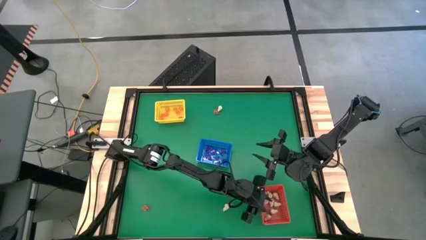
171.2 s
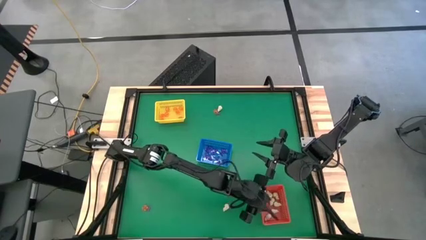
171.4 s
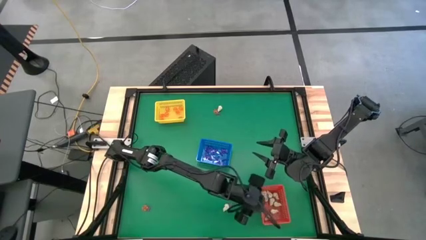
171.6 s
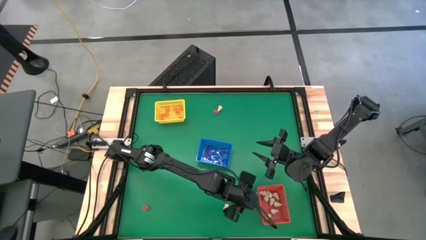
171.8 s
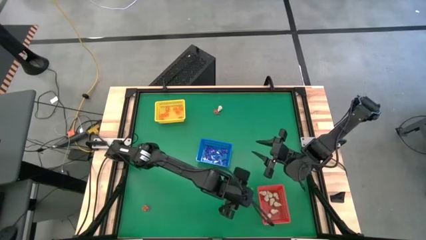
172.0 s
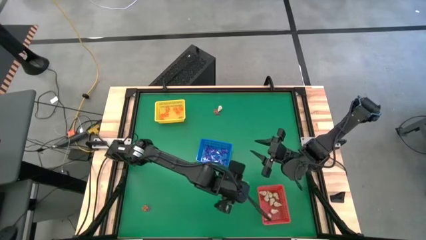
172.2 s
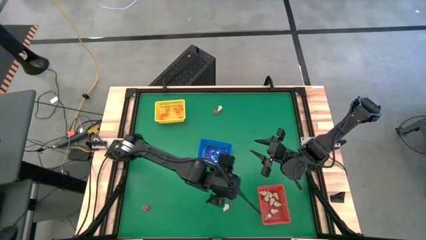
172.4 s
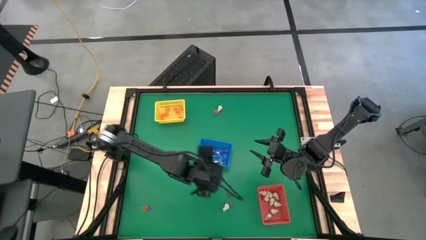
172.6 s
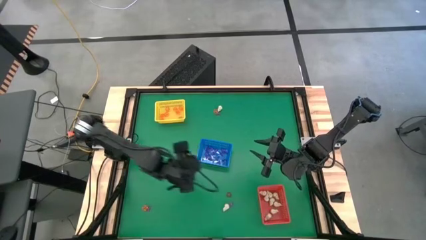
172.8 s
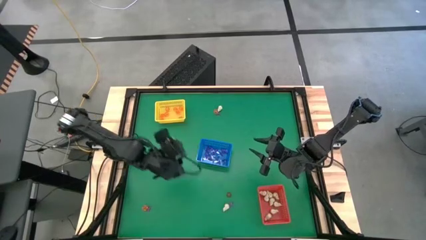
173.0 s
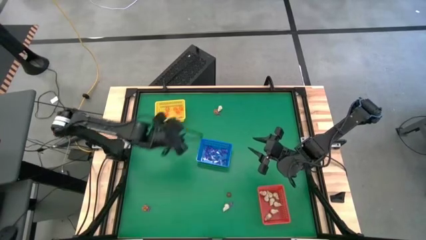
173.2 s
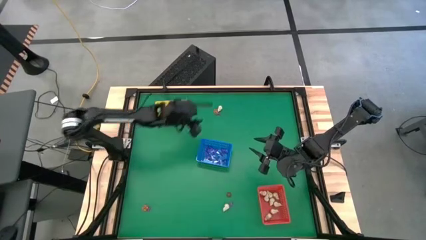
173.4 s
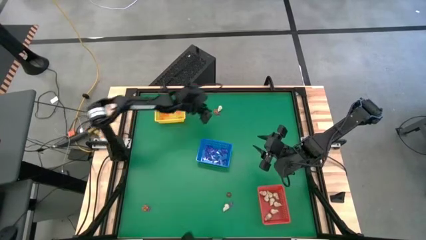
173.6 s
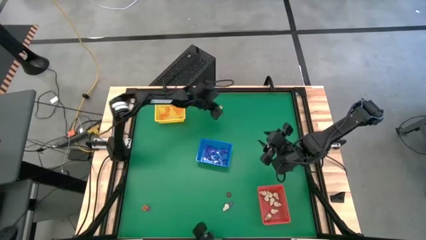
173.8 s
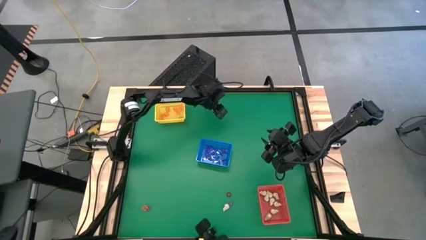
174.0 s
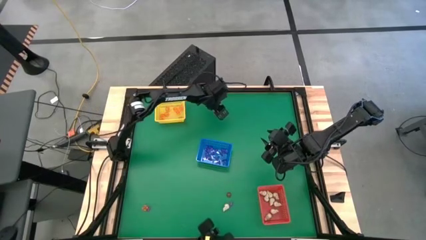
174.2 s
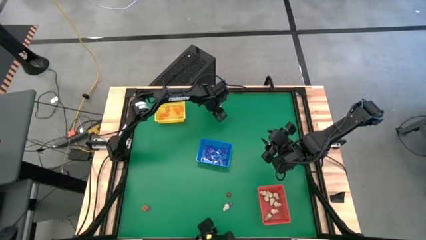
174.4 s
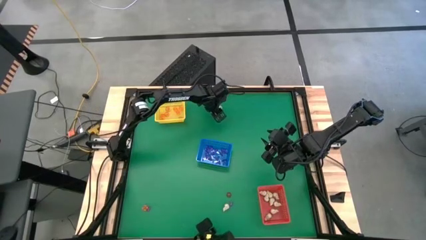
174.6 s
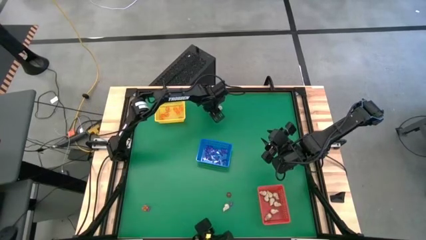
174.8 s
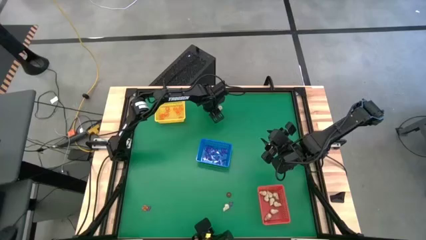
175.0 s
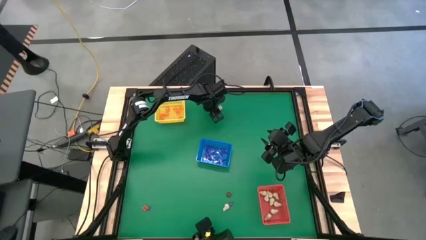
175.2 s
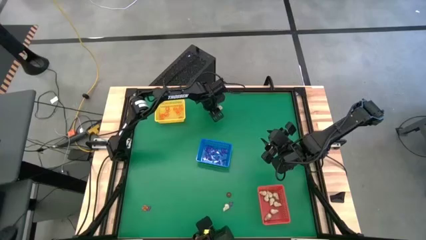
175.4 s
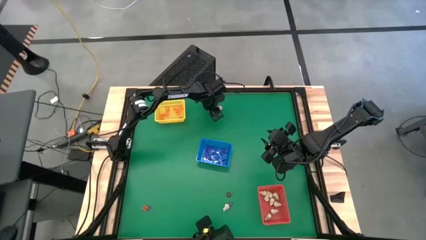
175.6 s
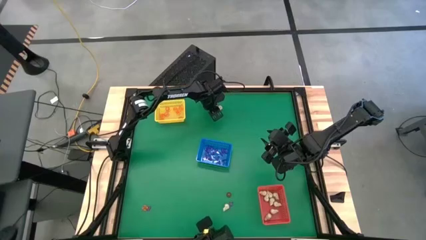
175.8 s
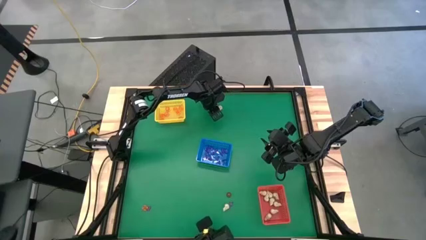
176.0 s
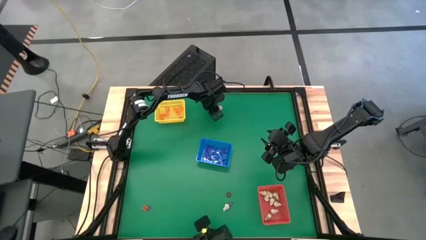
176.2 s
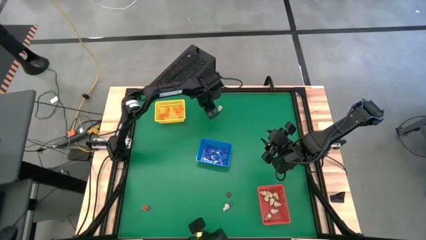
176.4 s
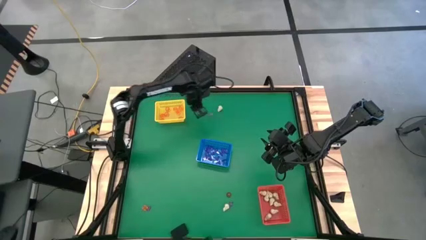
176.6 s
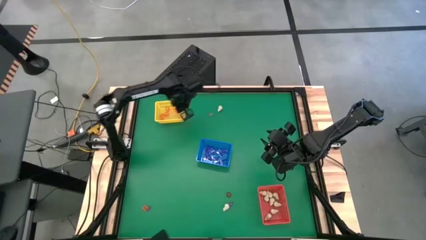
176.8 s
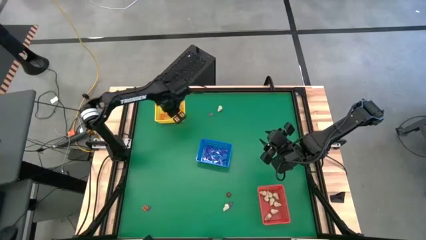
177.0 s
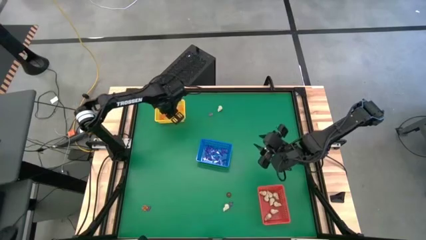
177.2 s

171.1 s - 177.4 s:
Task: Sort Halloween decoration
Put the pumpkin toy into the yellow bin

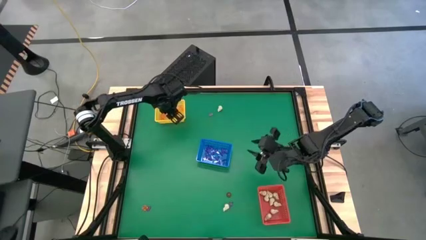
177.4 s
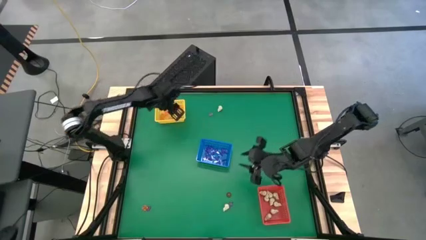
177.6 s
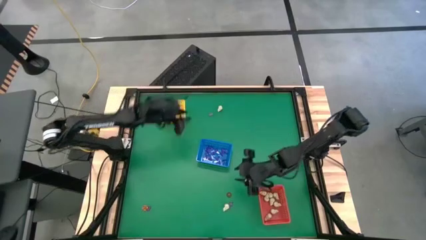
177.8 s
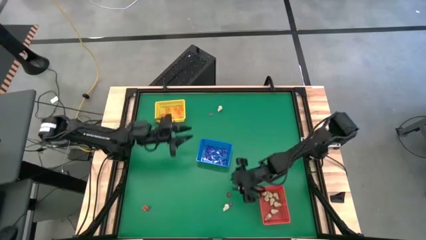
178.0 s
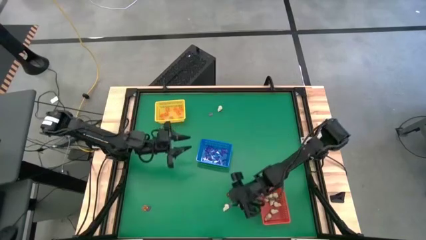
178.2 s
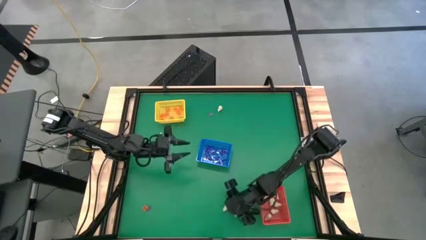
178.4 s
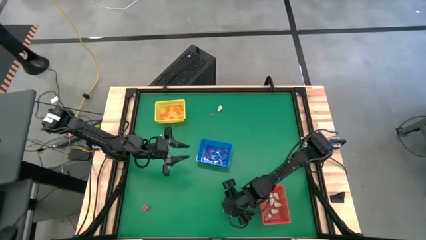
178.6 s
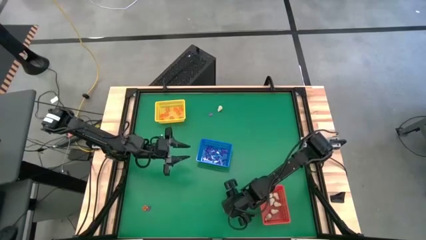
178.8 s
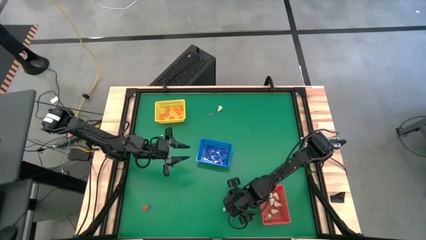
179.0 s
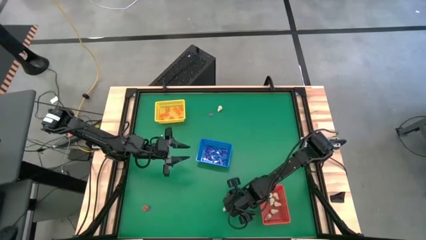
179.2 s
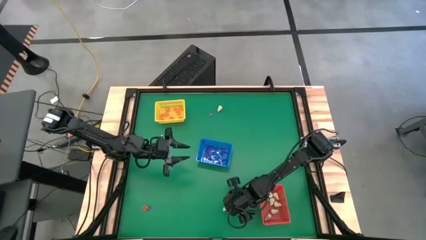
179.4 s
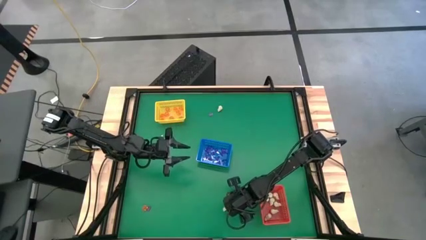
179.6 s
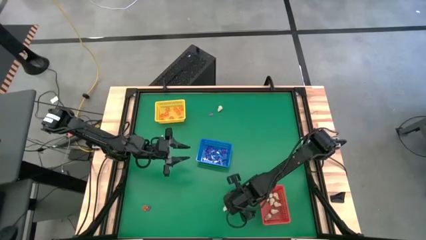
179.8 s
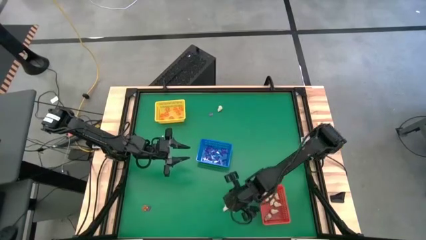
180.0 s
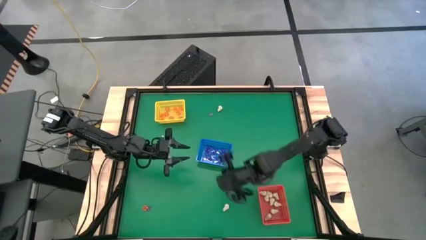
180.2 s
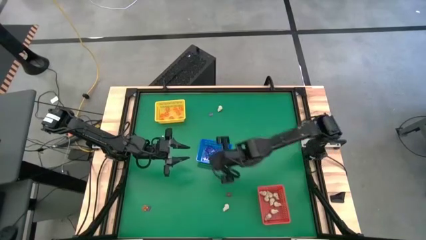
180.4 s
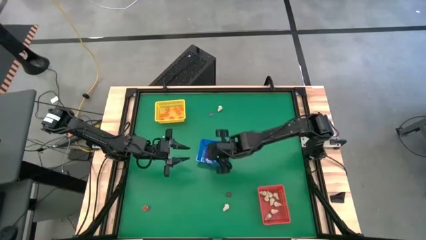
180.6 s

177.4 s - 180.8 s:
Put the witch hat toy into the blue bin

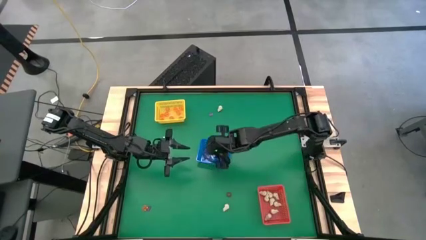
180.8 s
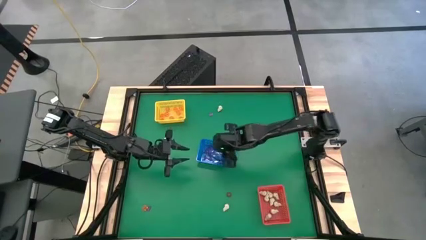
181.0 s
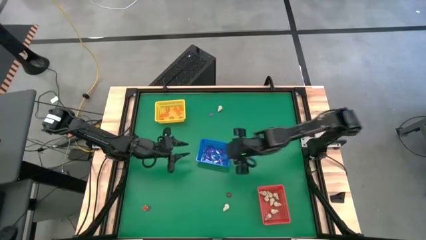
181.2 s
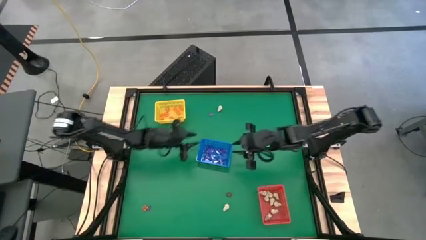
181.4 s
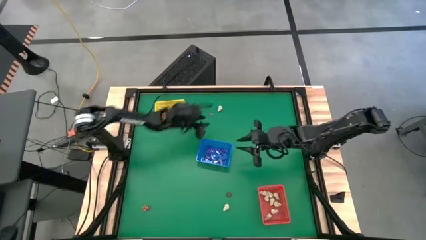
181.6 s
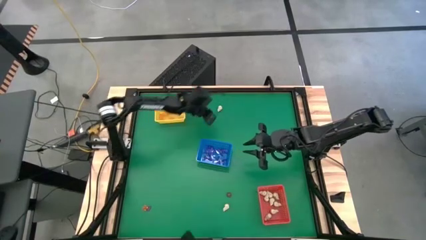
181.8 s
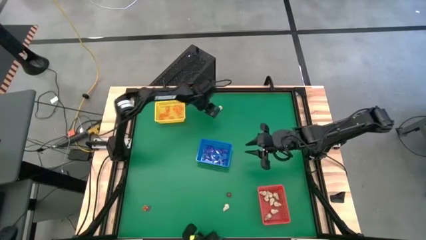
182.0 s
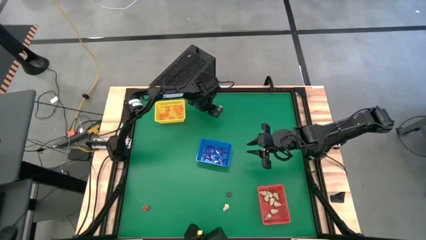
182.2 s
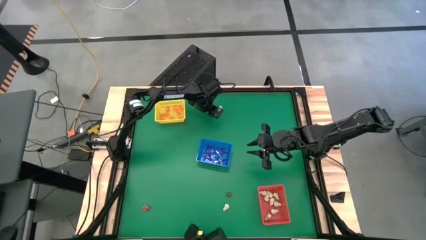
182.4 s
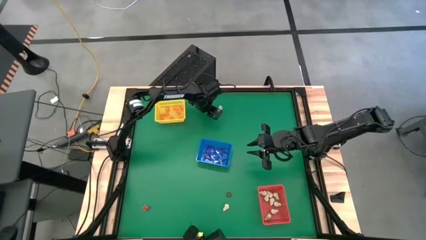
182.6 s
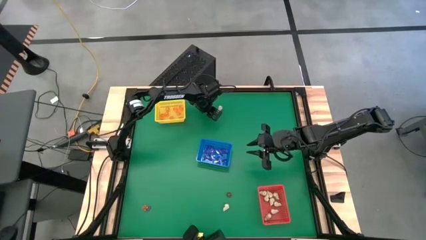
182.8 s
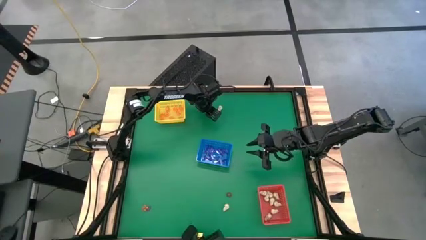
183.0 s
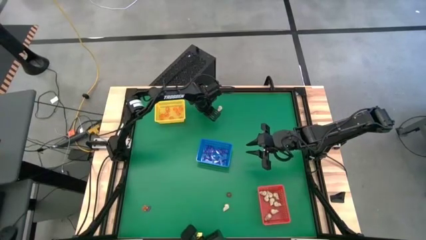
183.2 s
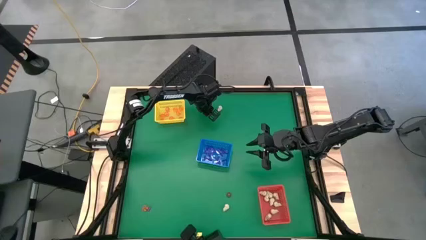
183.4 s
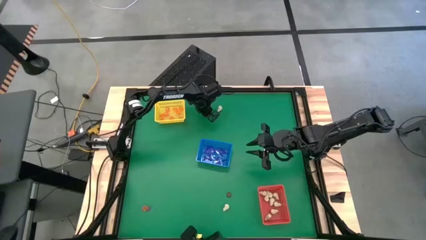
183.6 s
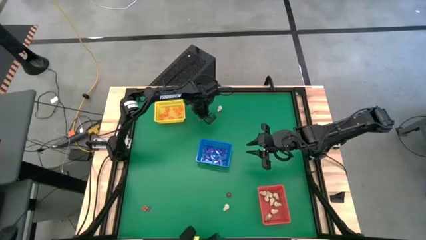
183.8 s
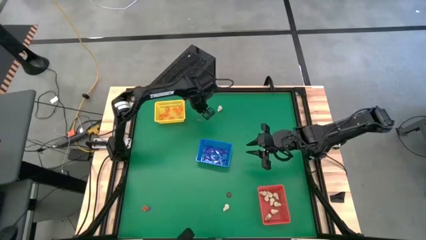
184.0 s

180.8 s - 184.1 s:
Put the witch hat toy into the blue bin

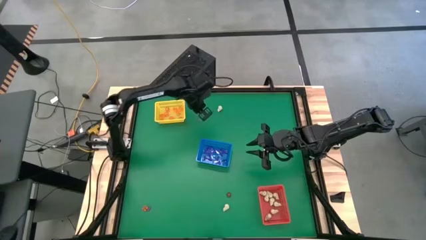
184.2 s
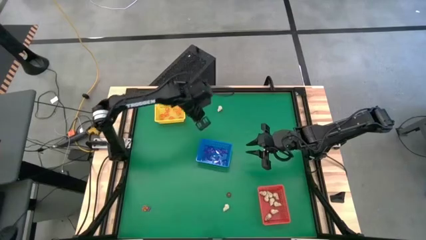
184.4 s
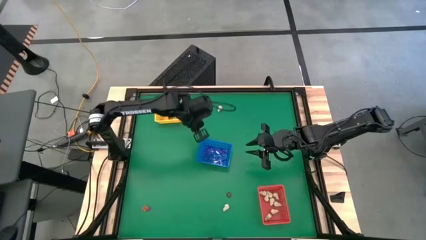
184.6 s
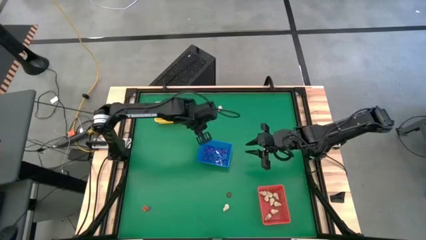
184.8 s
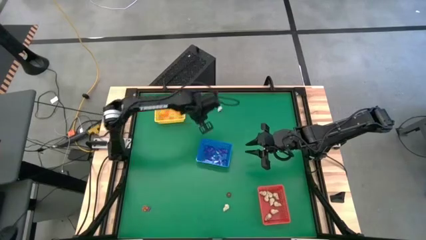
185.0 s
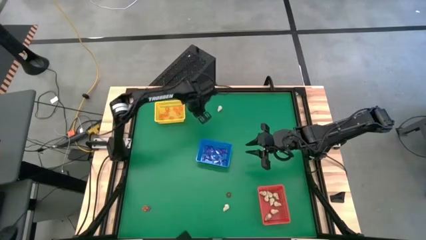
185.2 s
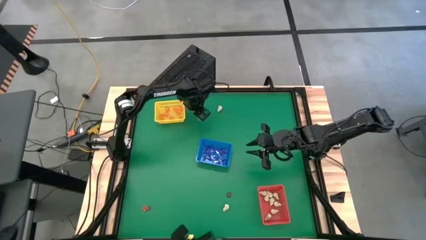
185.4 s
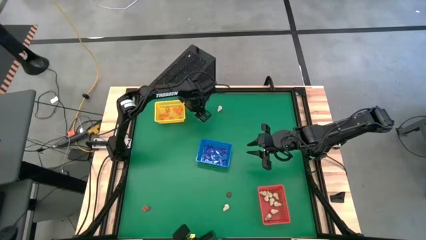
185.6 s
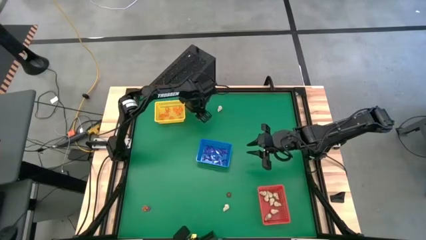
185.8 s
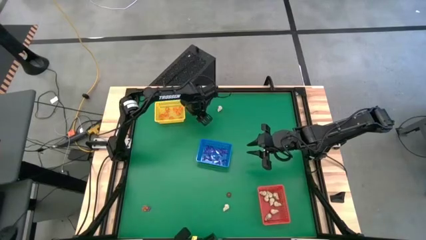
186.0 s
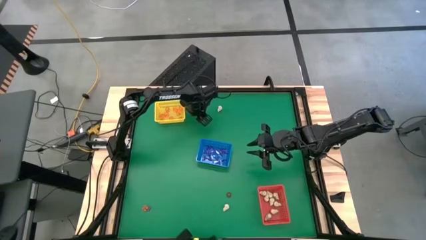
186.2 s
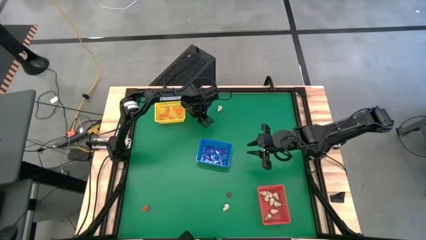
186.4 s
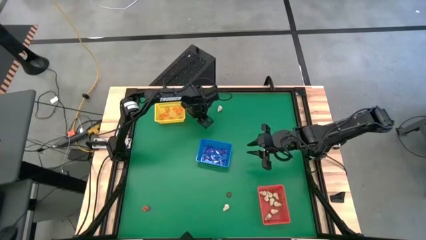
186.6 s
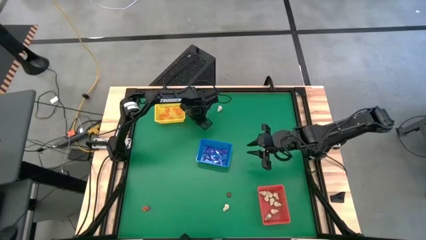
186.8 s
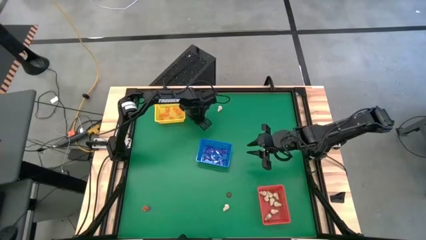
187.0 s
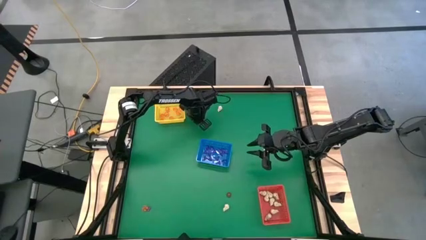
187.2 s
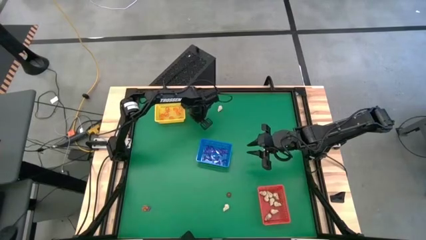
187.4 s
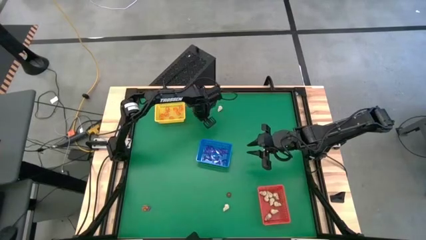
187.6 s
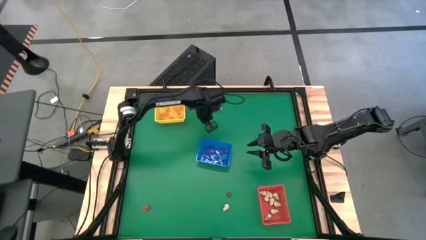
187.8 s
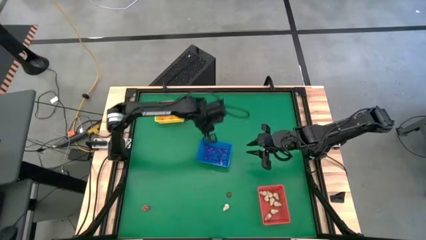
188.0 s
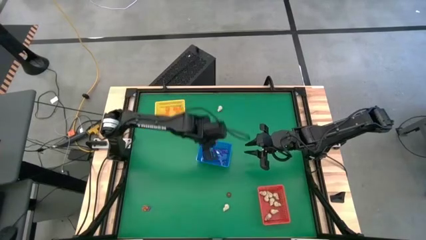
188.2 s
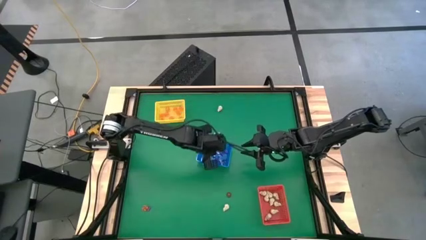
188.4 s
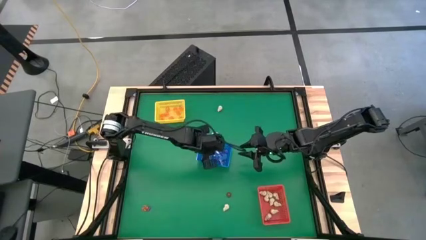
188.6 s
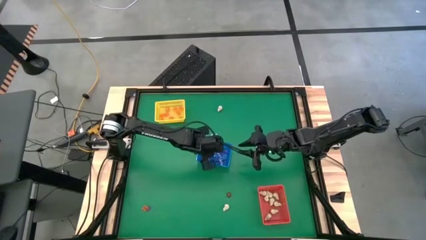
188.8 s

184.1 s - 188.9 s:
Put the witch hat toy into the blue bin
